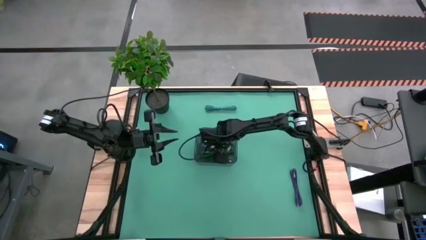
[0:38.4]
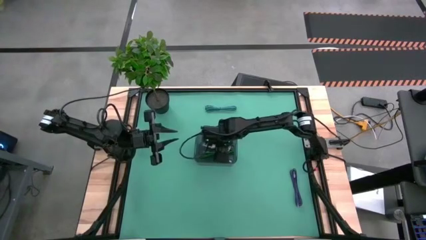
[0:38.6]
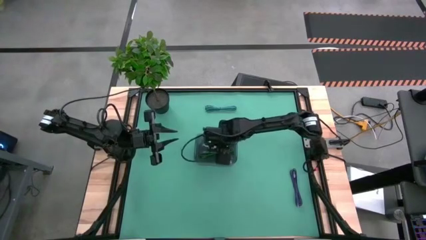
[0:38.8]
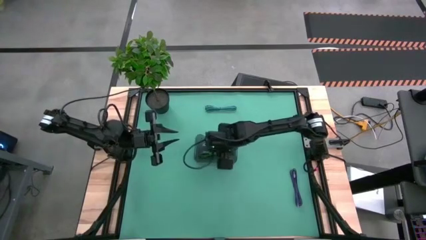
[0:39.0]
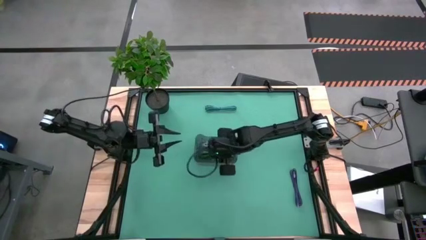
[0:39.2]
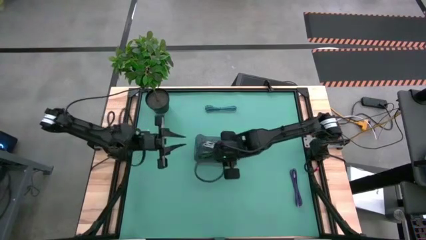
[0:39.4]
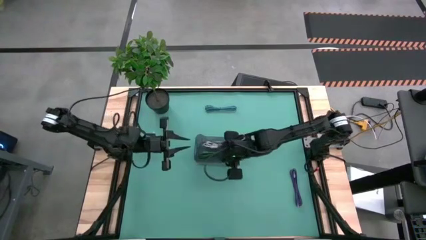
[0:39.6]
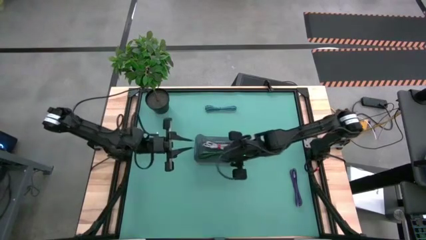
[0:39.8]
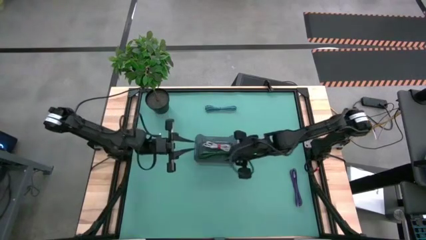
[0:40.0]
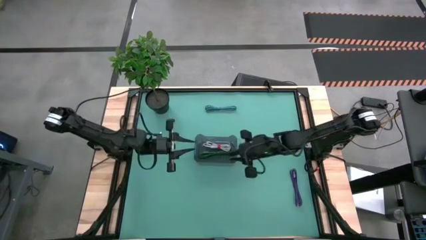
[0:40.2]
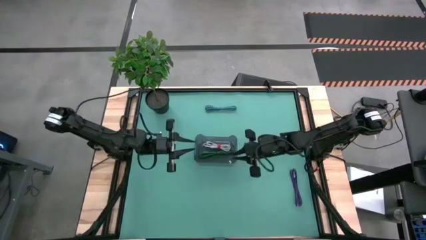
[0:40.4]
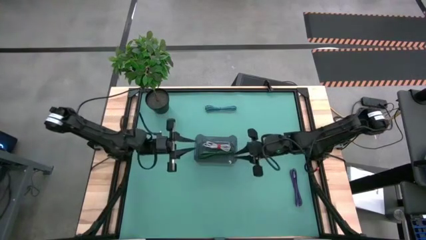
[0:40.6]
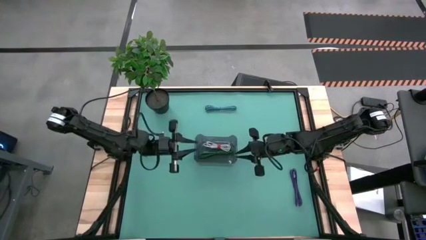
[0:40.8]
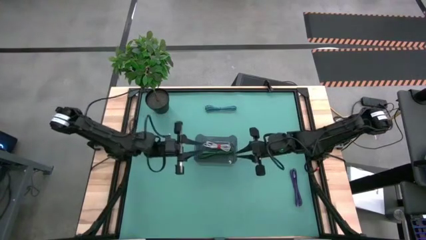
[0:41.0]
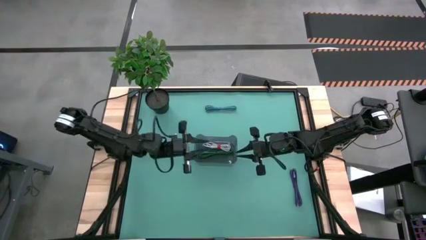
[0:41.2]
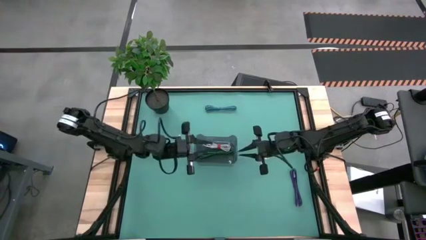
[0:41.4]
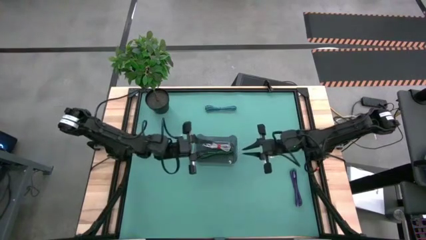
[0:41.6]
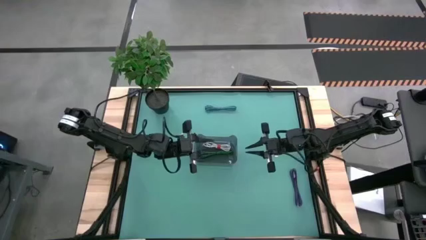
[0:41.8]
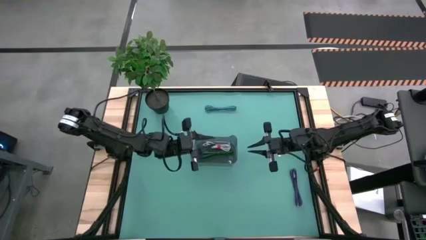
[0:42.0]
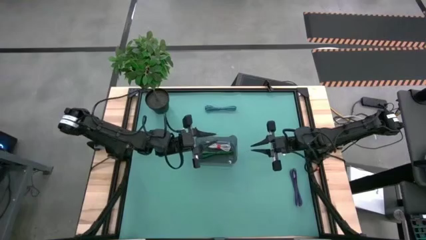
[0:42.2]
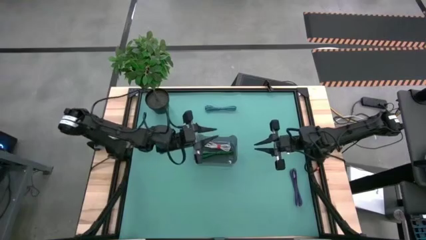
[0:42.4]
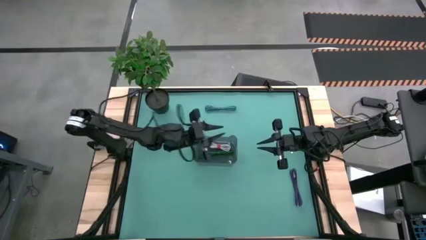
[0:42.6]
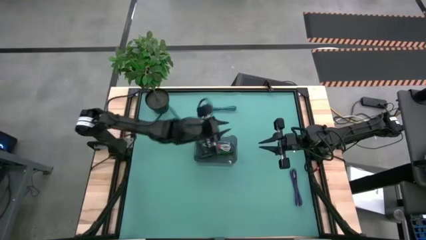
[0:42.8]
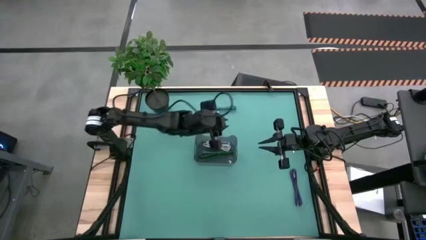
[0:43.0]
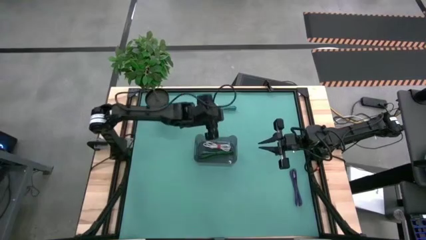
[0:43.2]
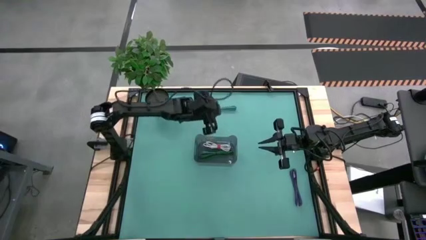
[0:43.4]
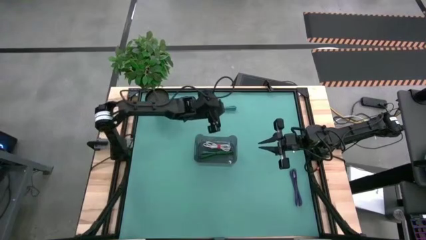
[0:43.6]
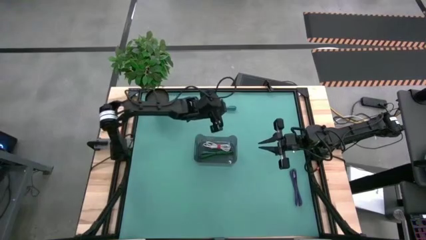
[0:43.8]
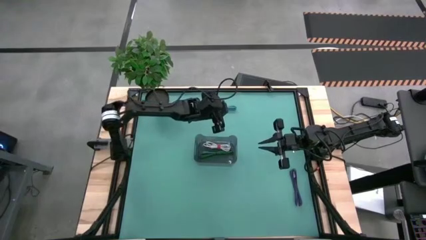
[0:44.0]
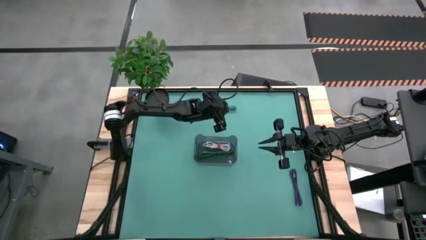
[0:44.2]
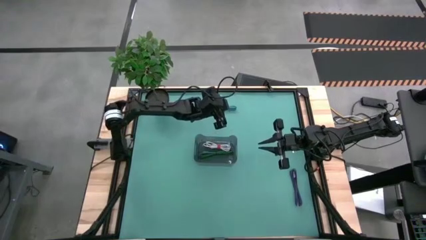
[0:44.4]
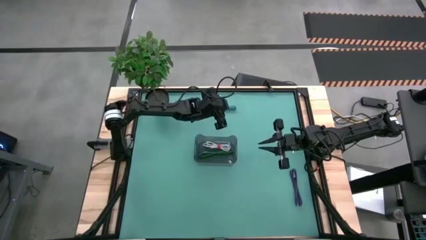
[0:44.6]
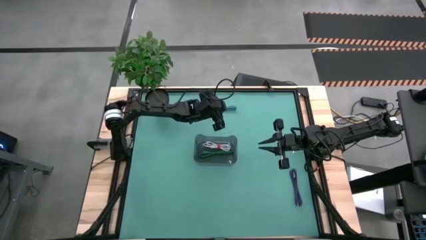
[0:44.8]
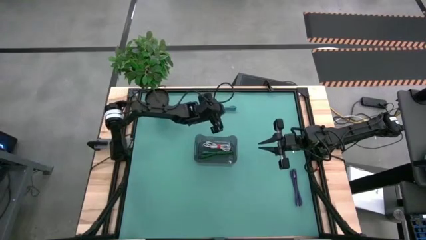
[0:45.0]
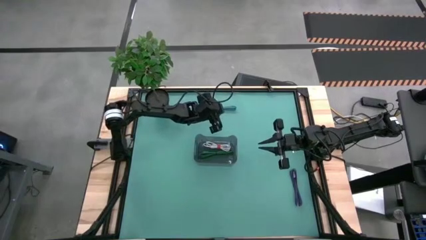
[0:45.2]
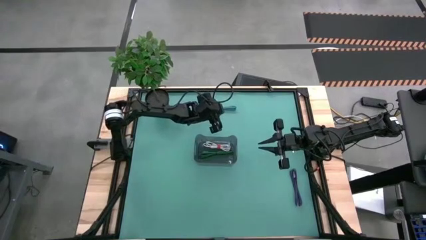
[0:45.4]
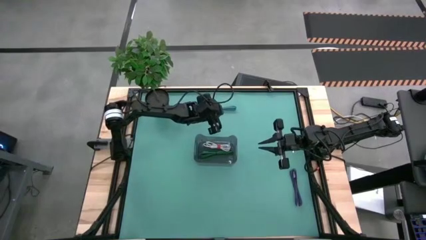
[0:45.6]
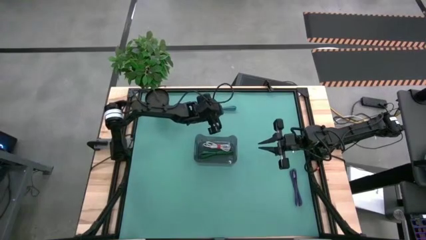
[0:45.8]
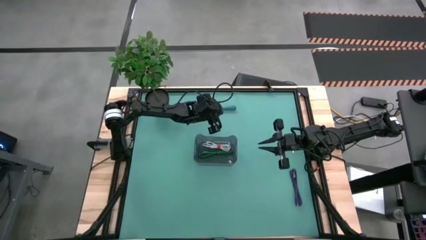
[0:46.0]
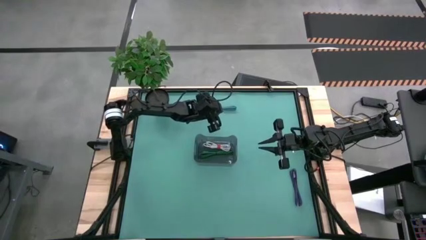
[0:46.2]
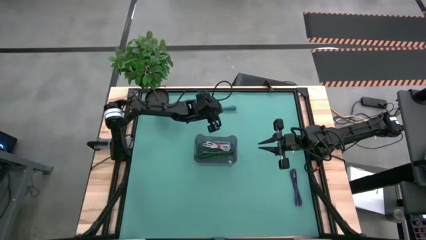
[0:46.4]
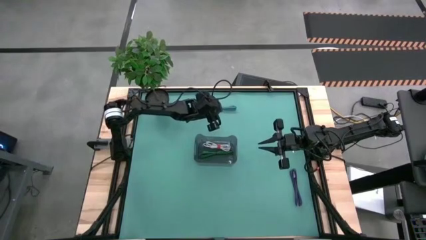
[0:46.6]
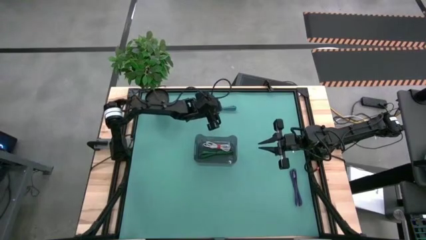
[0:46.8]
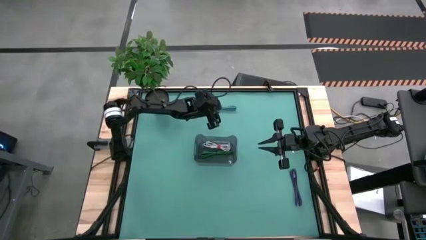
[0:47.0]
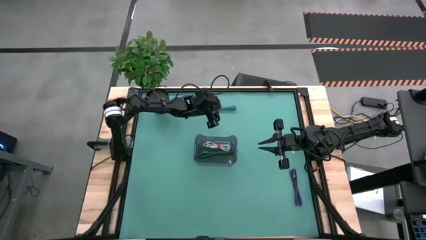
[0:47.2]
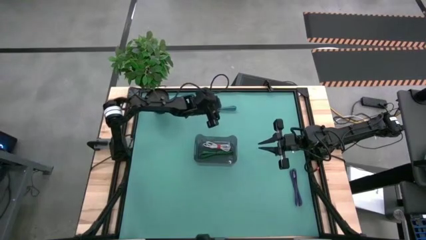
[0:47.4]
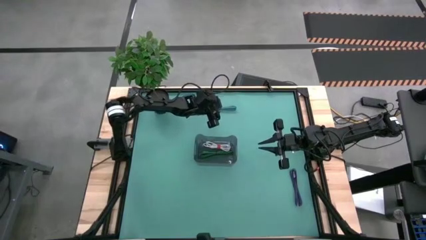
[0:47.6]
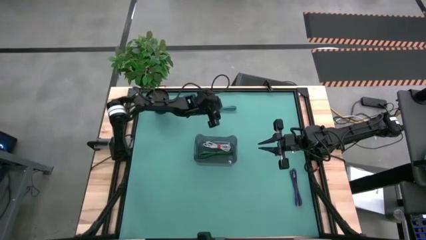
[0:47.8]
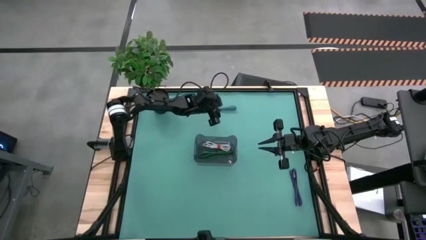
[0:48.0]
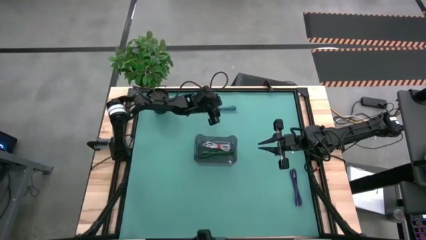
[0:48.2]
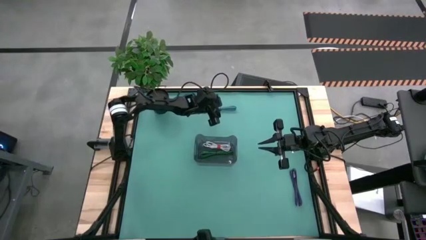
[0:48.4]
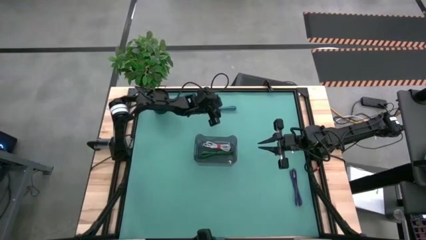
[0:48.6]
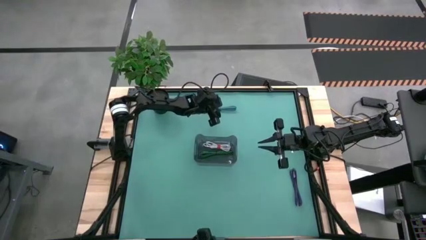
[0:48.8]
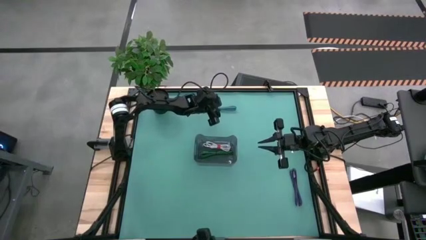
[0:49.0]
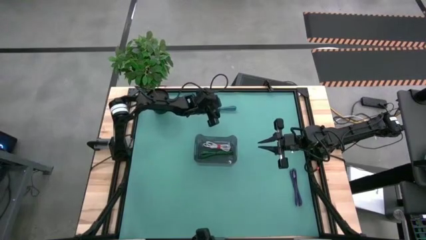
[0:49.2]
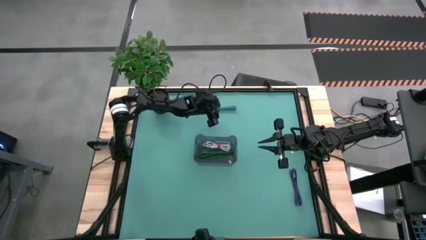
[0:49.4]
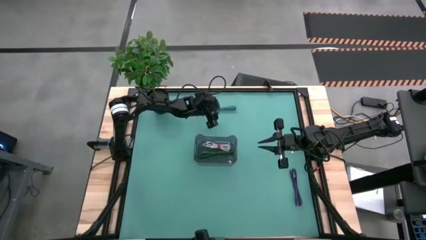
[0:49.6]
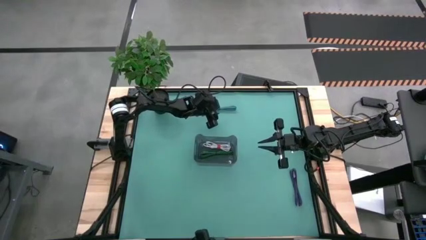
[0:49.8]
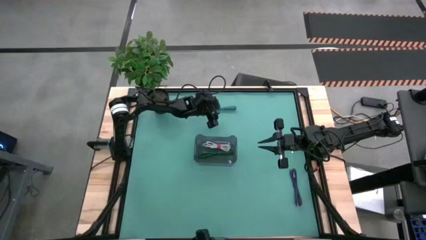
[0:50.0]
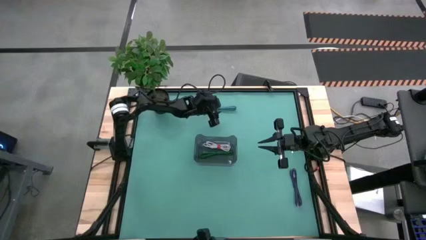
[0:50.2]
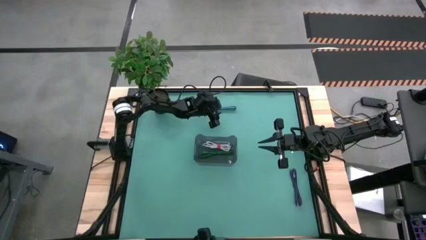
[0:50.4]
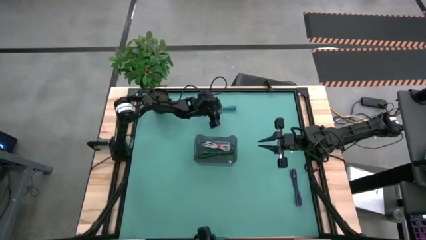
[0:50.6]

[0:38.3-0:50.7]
Task: Pick and place USB-C Cables
Put the blue cable into the black transparent container
